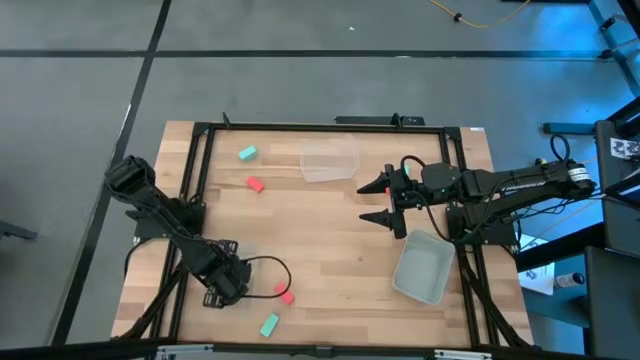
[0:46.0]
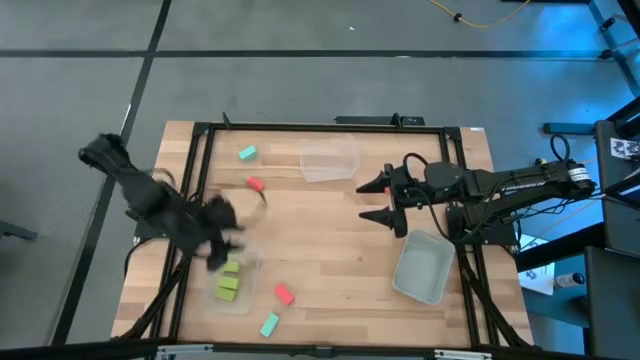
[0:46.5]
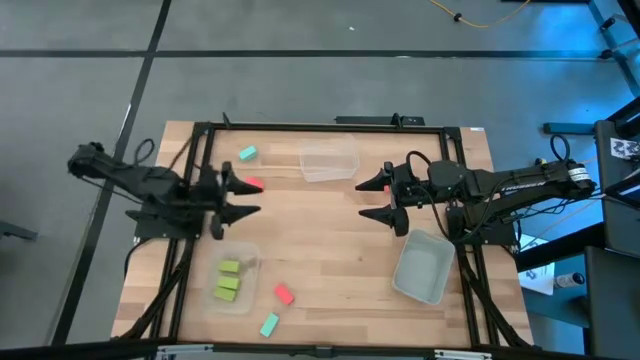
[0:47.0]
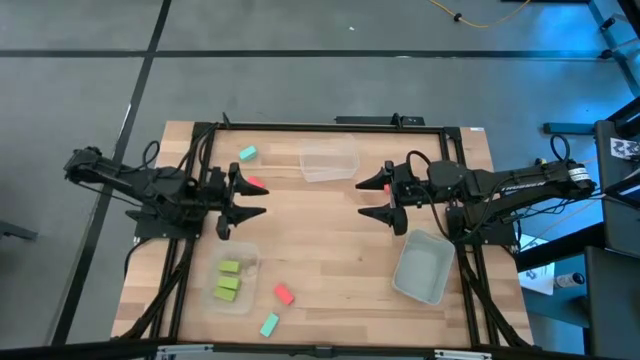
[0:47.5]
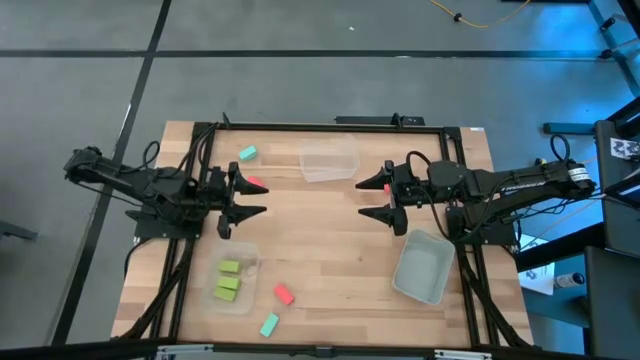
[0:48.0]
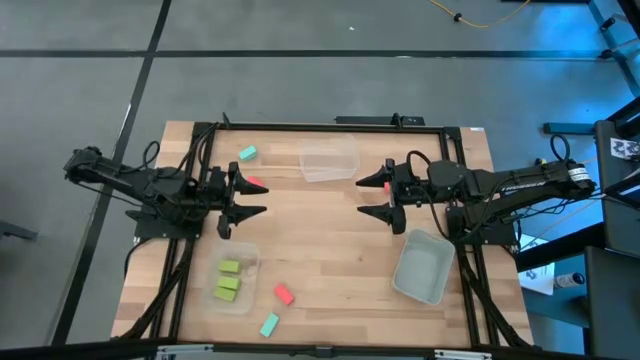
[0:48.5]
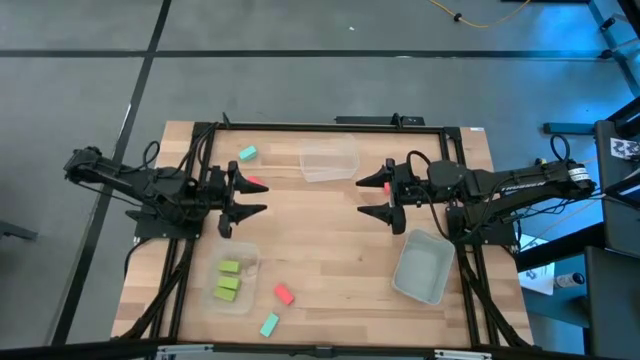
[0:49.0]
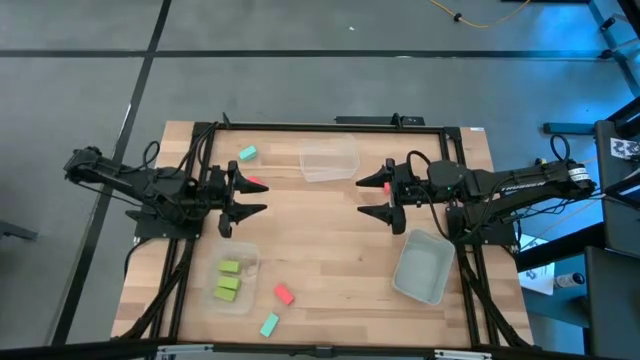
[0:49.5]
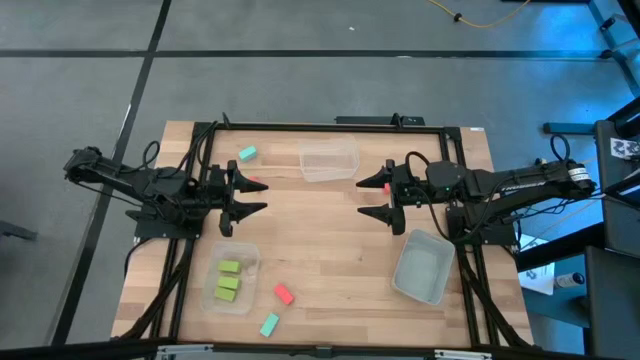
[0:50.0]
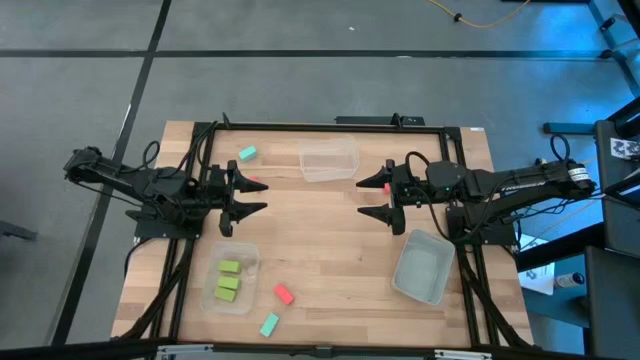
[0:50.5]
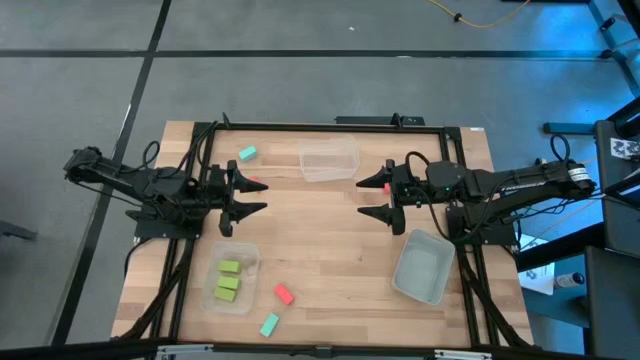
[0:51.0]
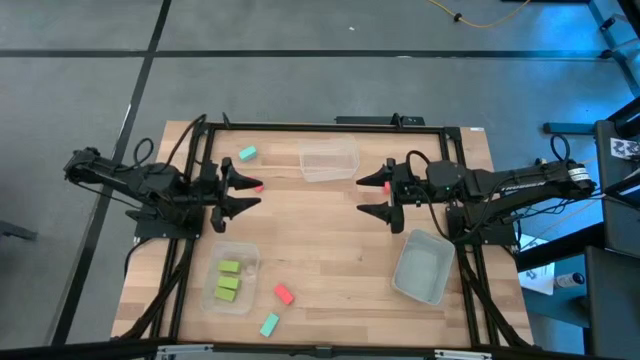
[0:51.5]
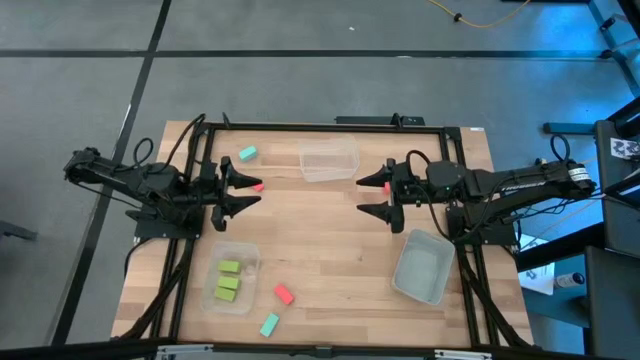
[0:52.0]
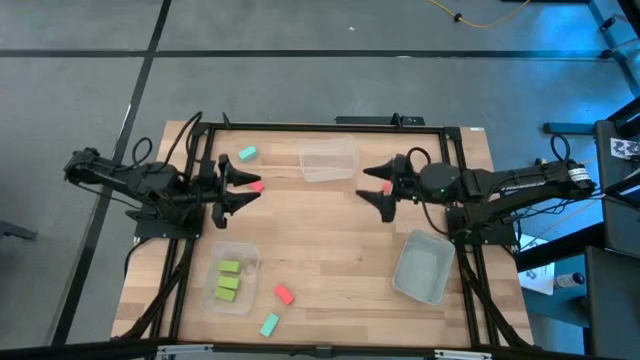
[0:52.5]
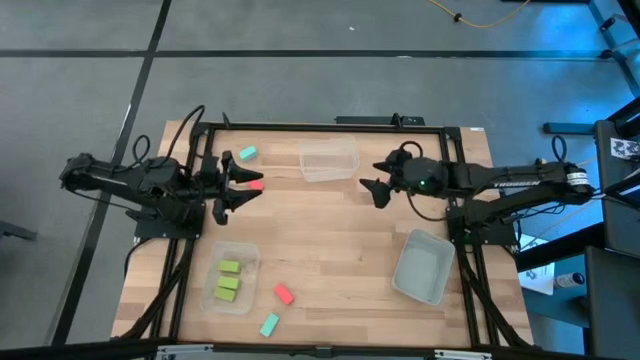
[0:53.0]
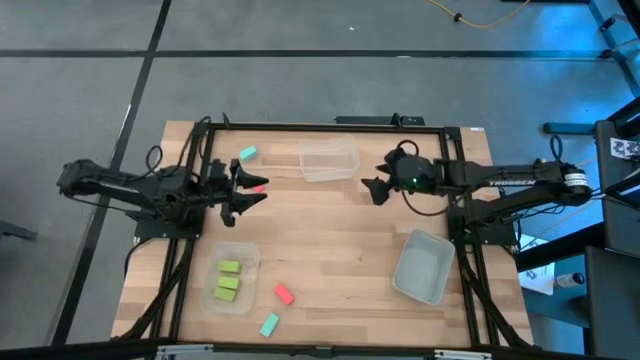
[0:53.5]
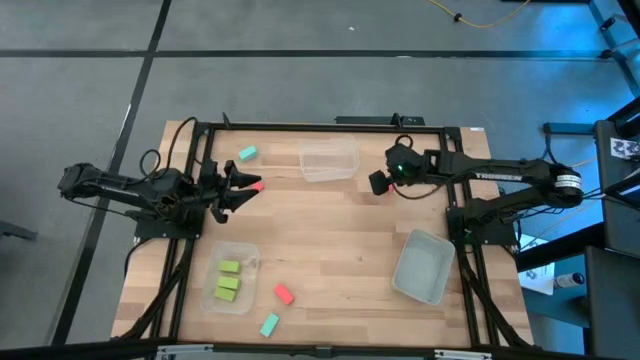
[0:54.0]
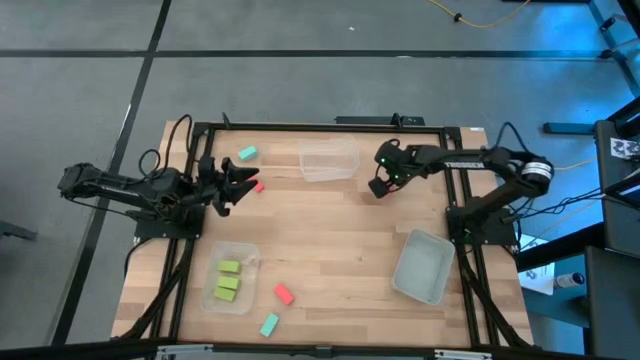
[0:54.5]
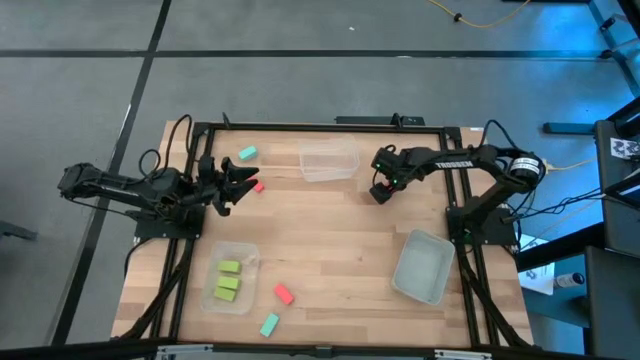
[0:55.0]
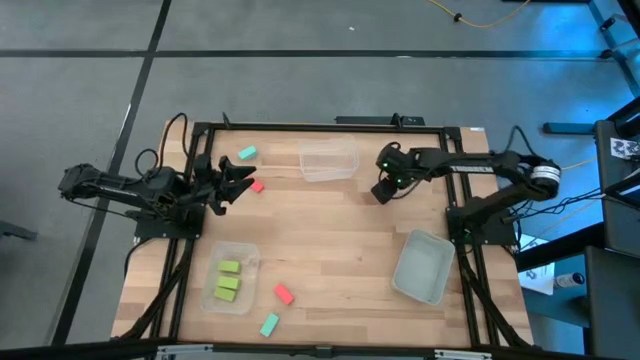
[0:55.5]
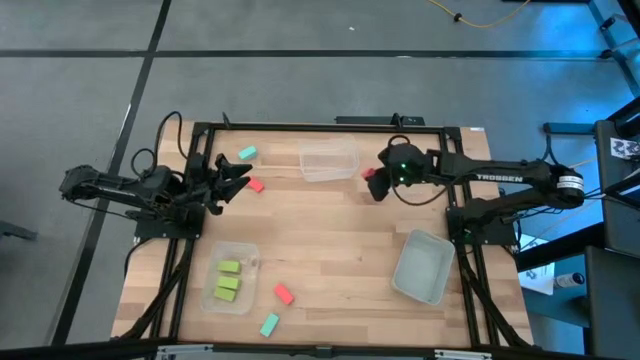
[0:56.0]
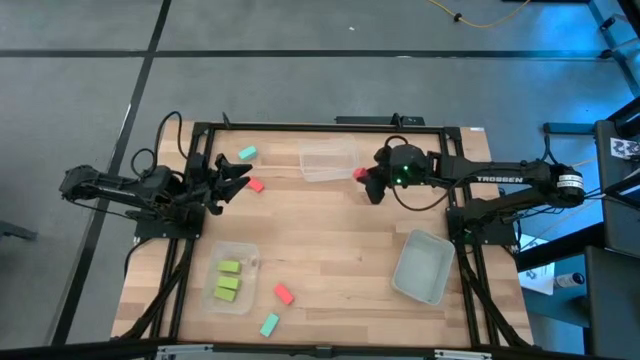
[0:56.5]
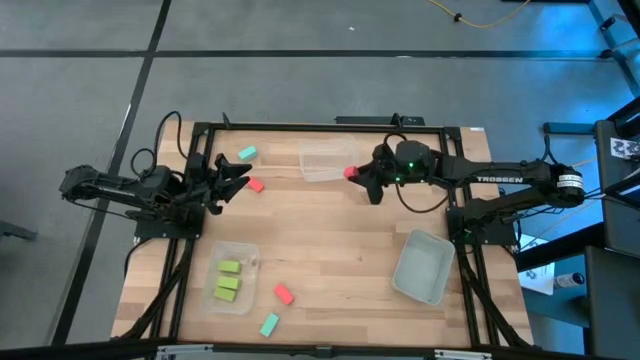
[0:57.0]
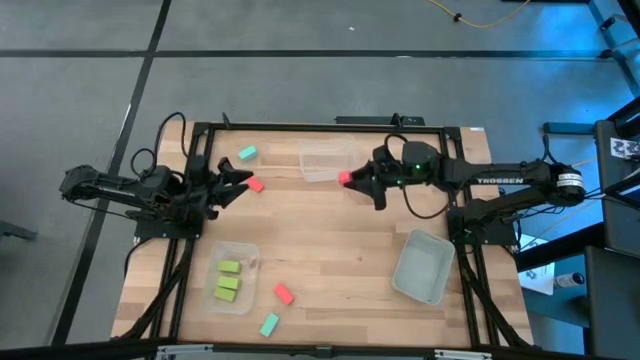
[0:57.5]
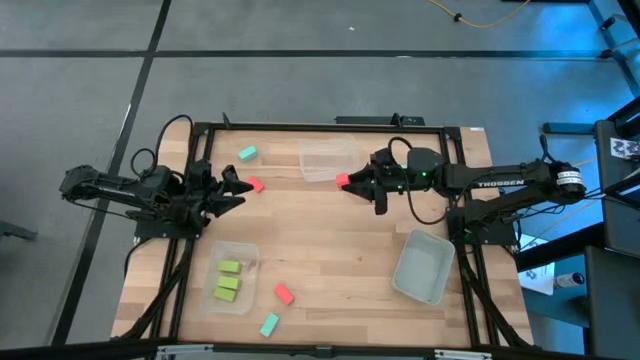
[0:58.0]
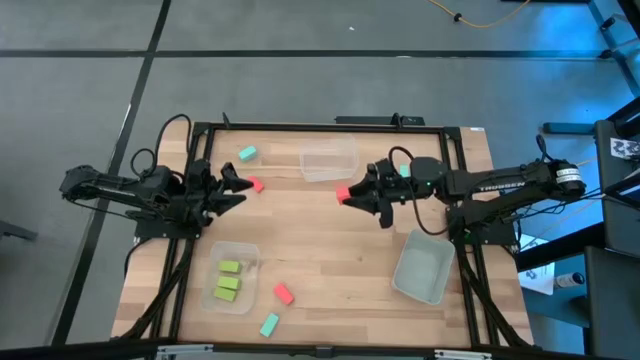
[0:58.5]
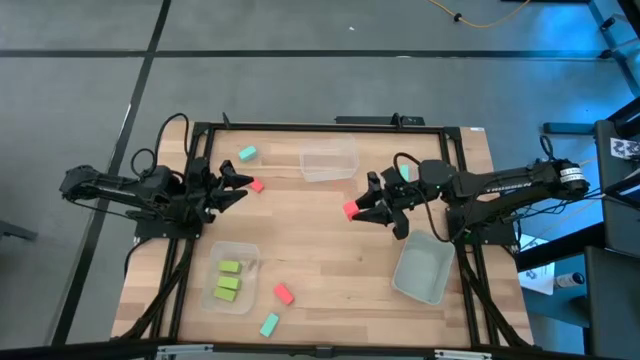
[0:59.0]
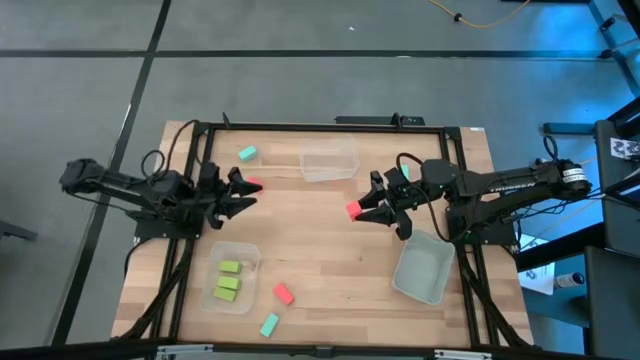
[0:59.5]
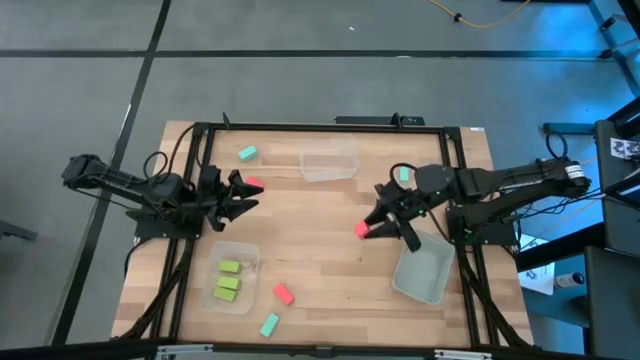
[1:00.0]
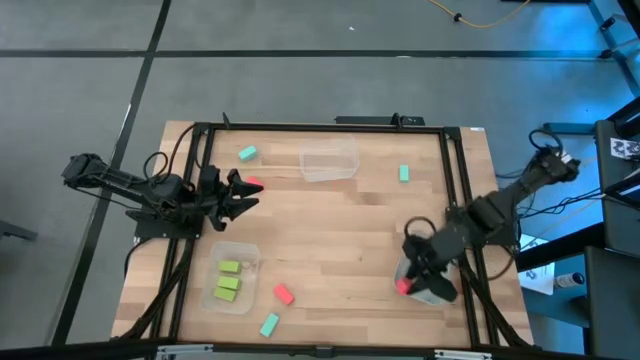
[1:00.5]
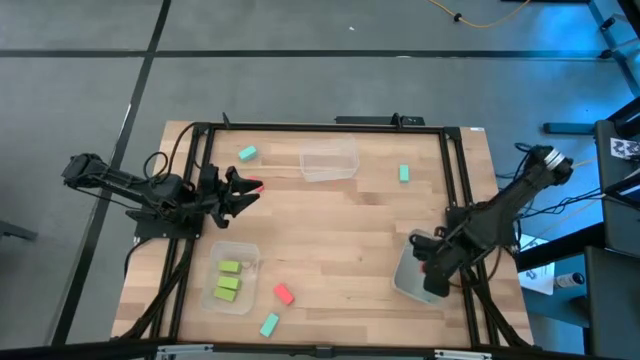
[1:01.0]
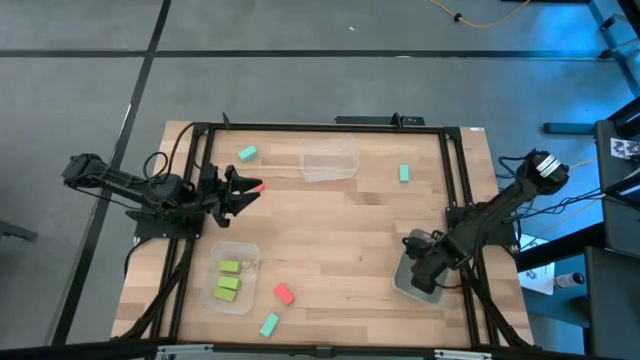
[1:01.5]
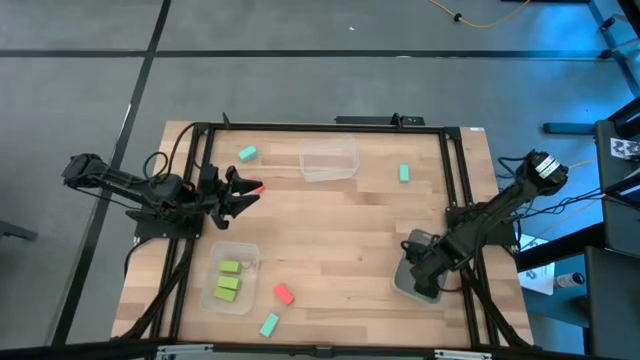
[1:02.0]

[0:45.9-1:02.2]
Task: Sort & place blocks by color
Put the top right orange block into the gray bin

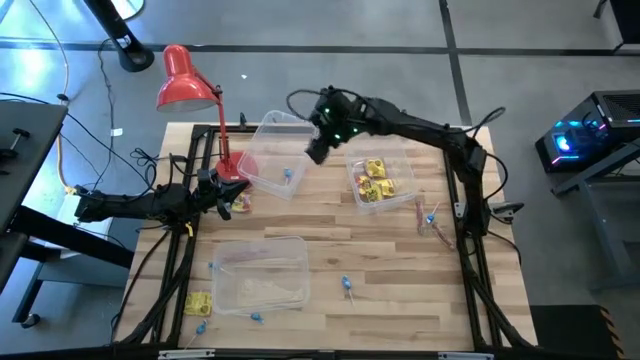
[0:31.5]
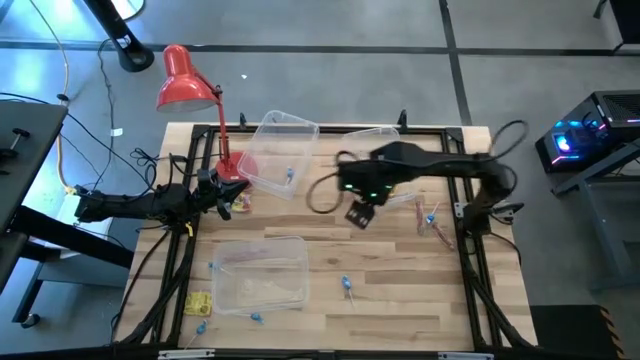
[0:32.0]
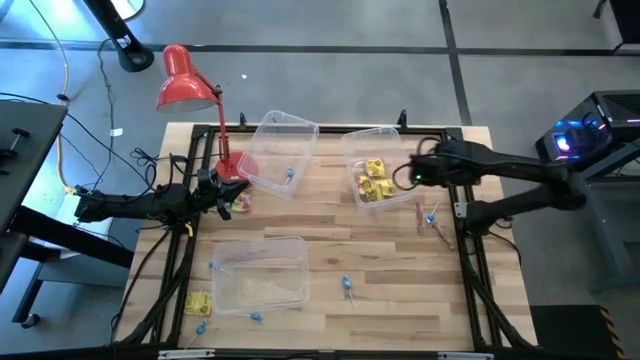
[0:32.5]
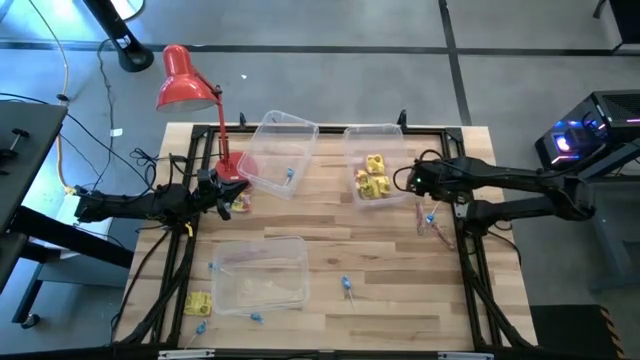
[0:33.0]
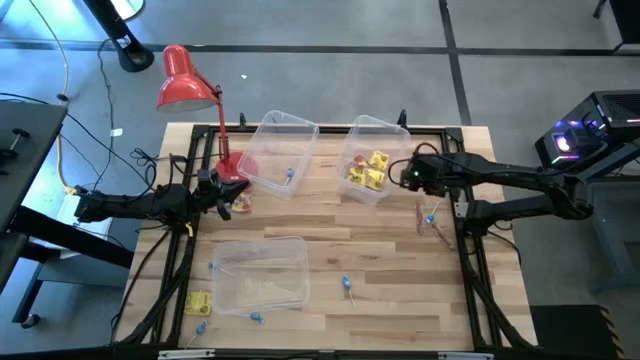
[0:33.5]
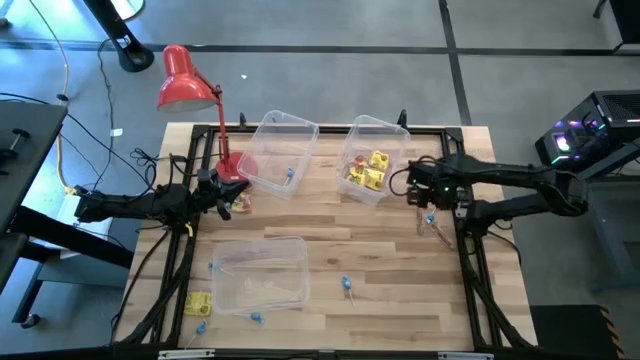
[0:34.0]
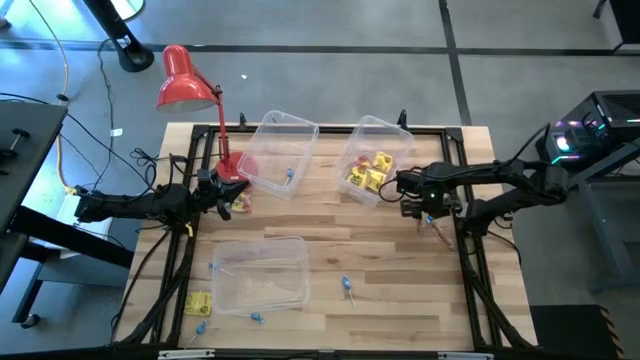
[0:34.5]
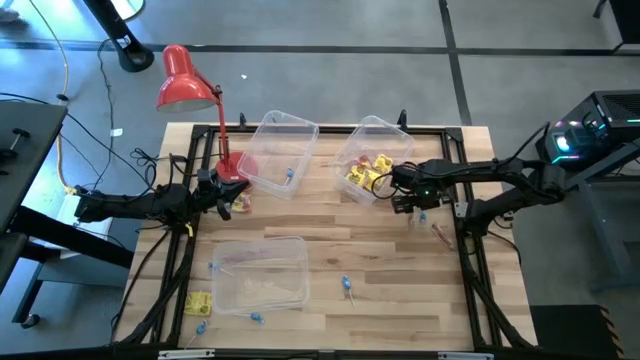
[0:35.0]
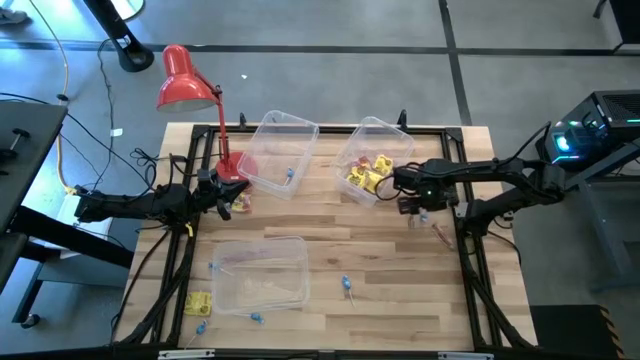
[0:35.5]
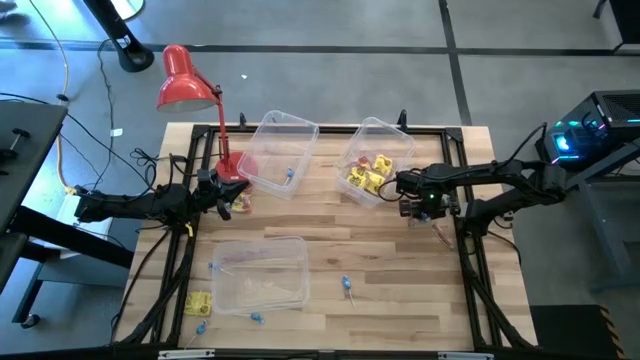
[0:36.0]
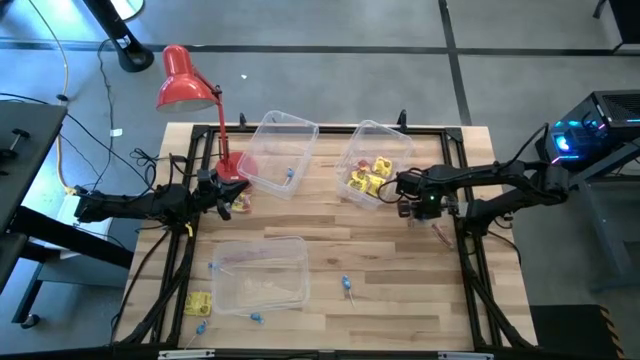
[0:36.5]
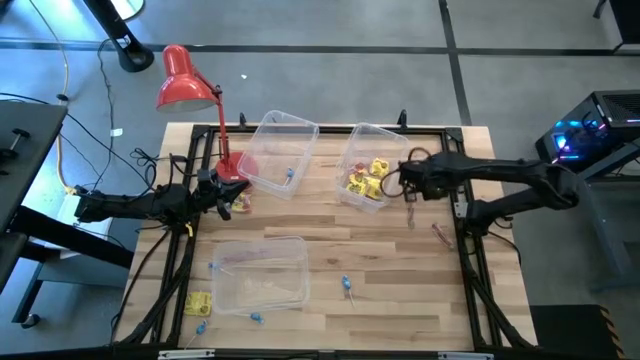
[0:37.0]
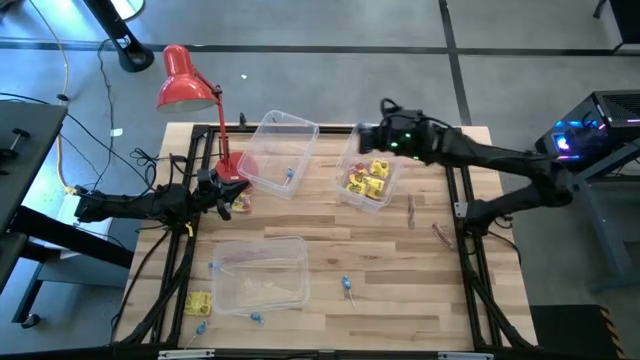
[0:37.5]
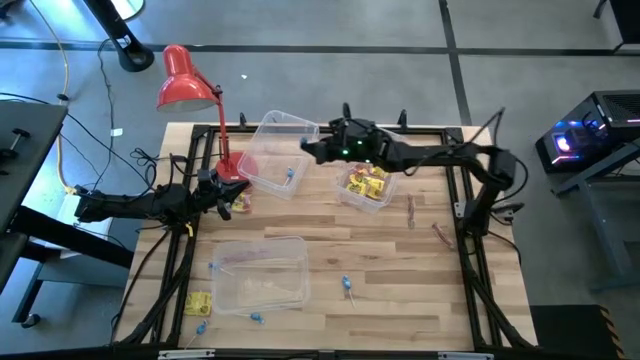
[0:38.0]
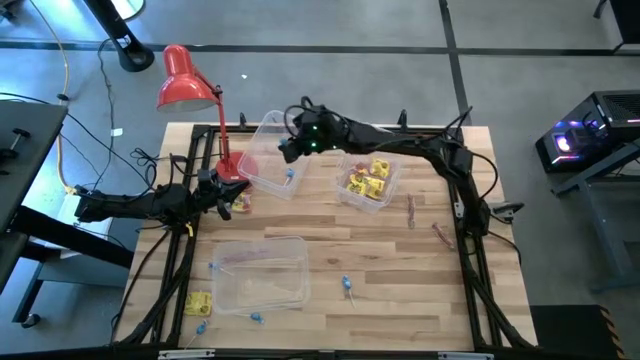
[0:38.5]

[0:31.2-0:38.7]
Task: Sort candy
Put the blue lollipop into the top left transparent bin
